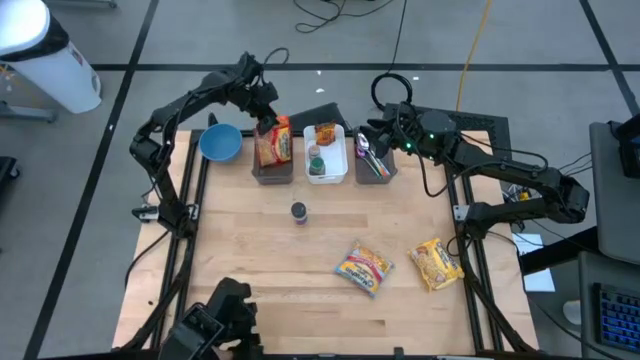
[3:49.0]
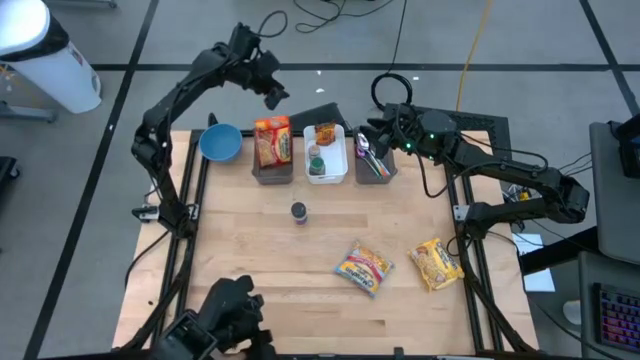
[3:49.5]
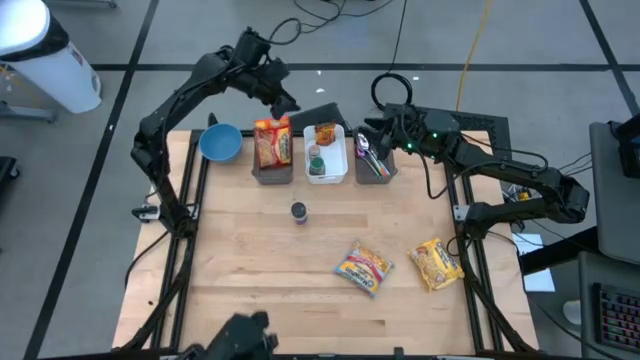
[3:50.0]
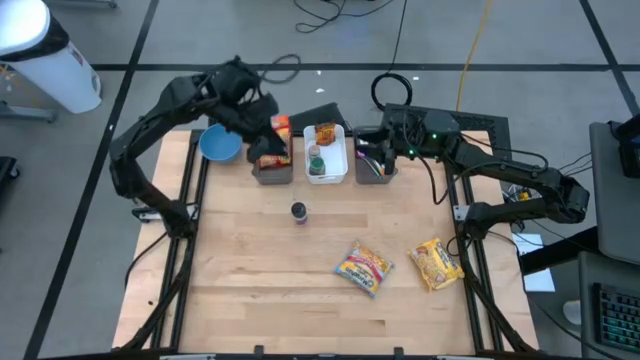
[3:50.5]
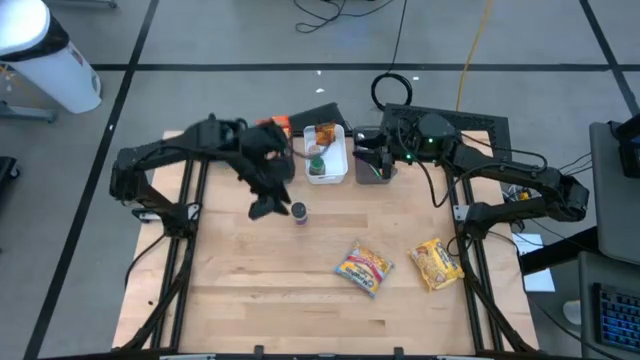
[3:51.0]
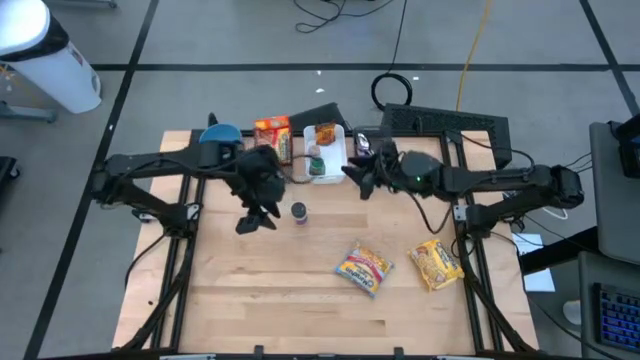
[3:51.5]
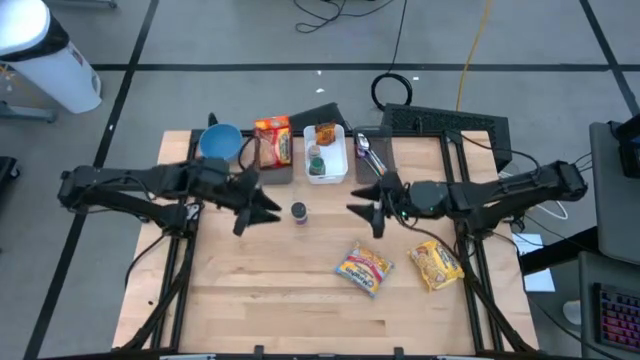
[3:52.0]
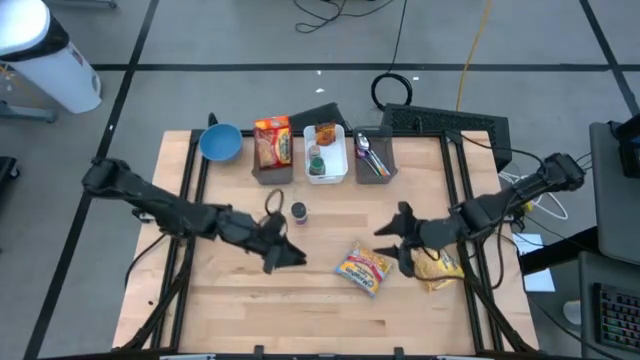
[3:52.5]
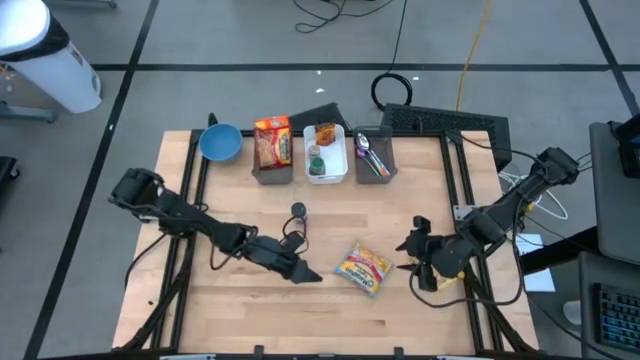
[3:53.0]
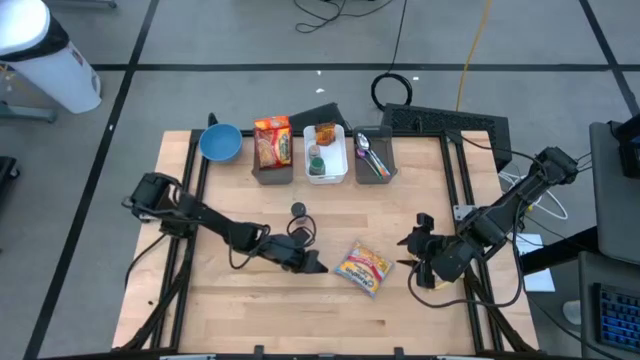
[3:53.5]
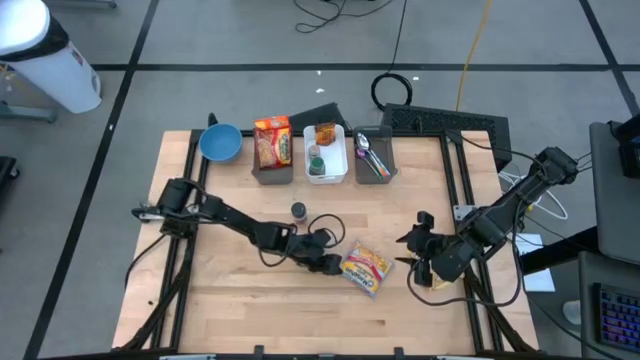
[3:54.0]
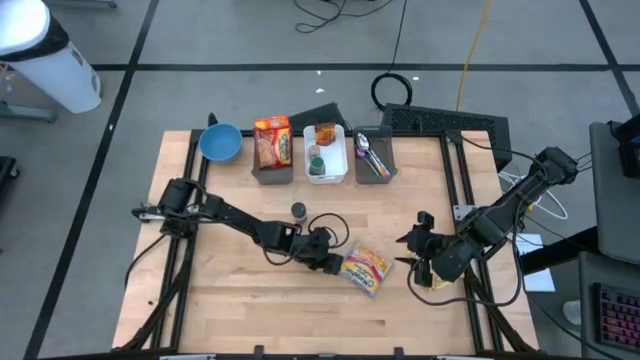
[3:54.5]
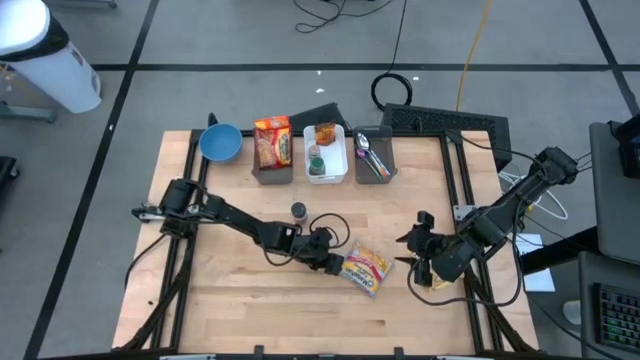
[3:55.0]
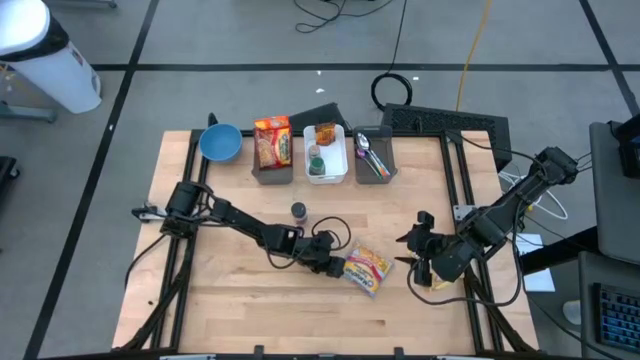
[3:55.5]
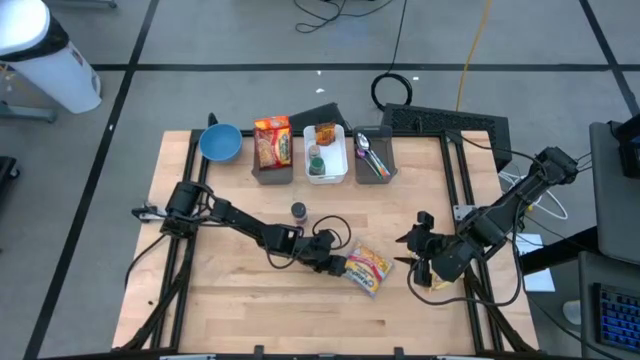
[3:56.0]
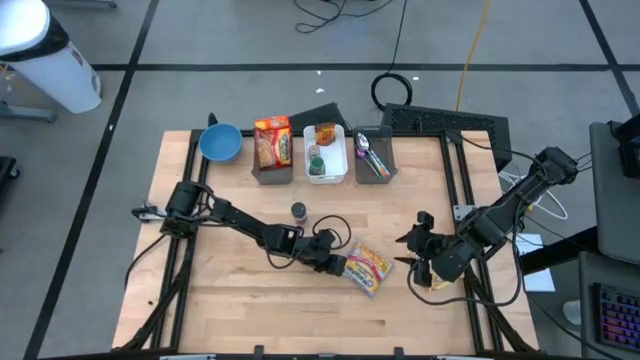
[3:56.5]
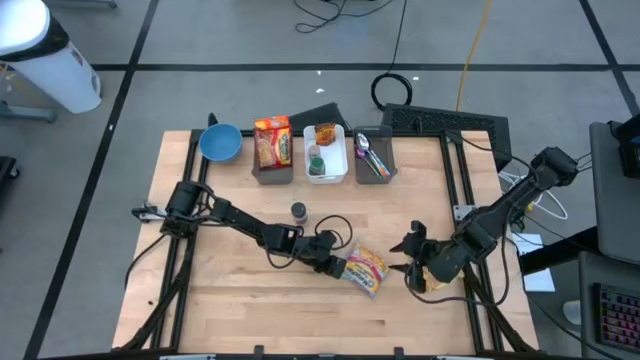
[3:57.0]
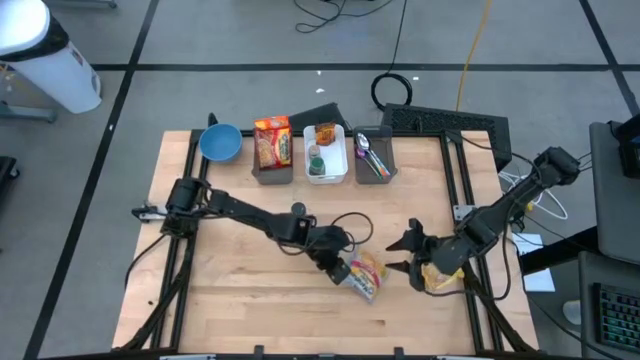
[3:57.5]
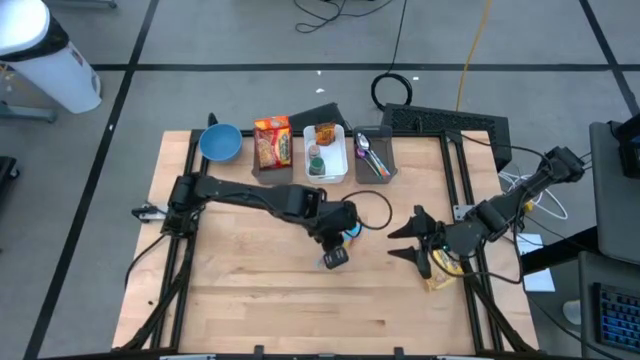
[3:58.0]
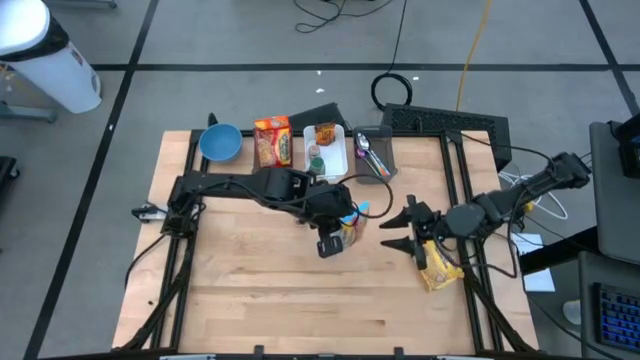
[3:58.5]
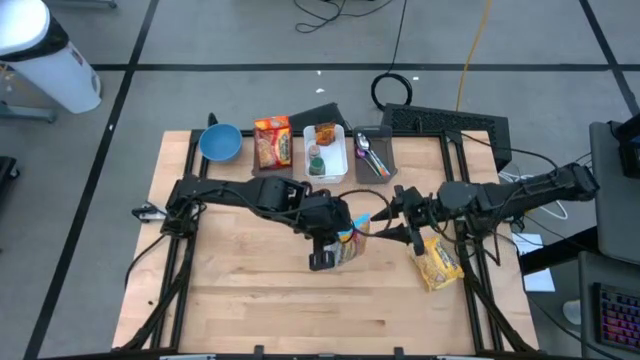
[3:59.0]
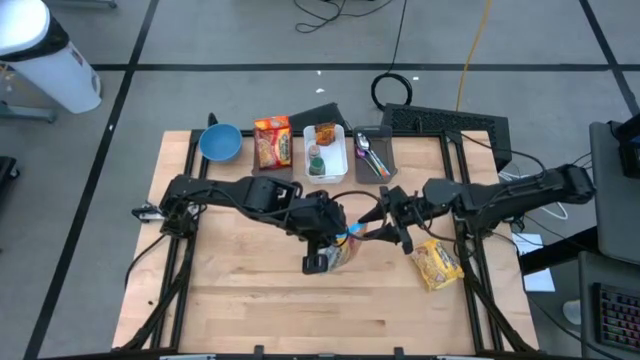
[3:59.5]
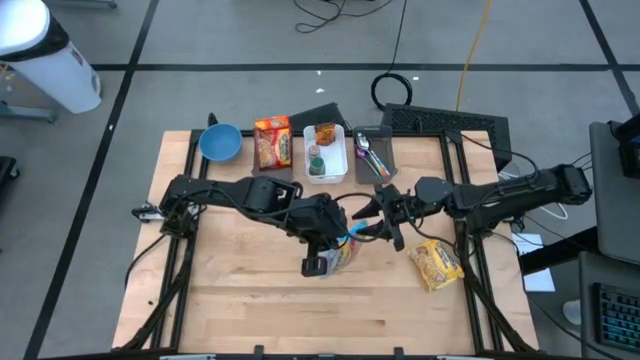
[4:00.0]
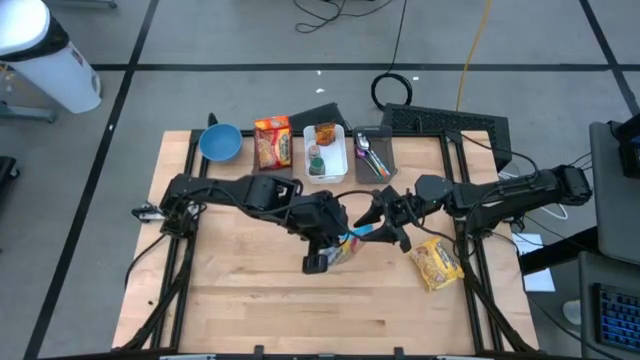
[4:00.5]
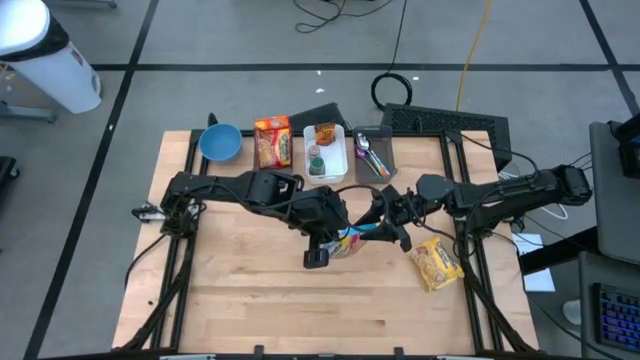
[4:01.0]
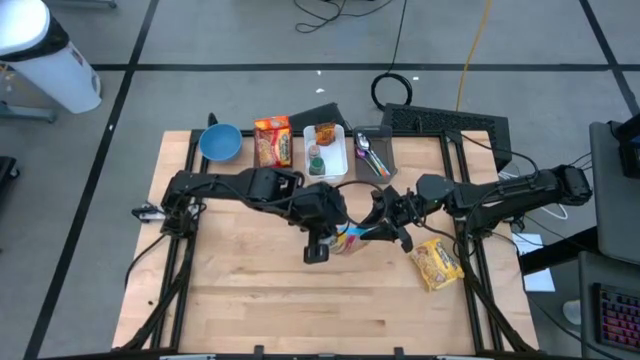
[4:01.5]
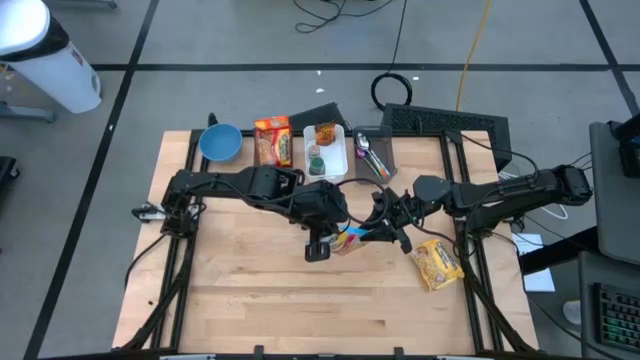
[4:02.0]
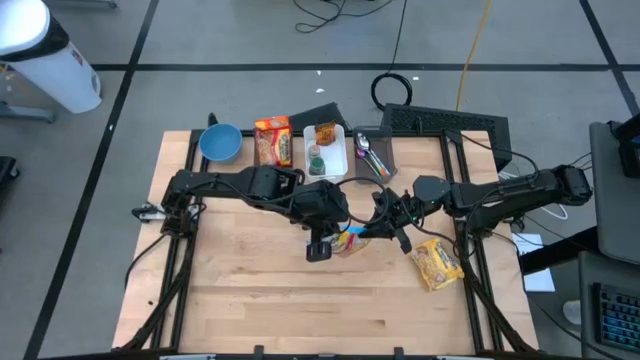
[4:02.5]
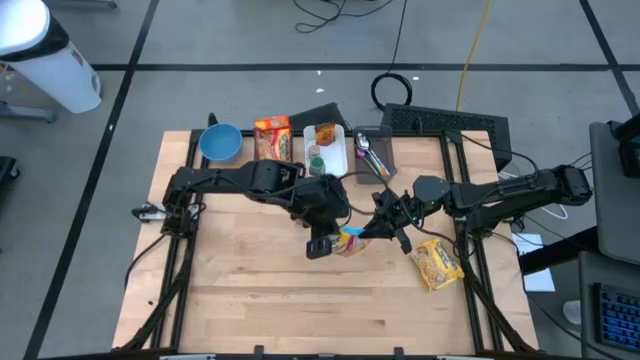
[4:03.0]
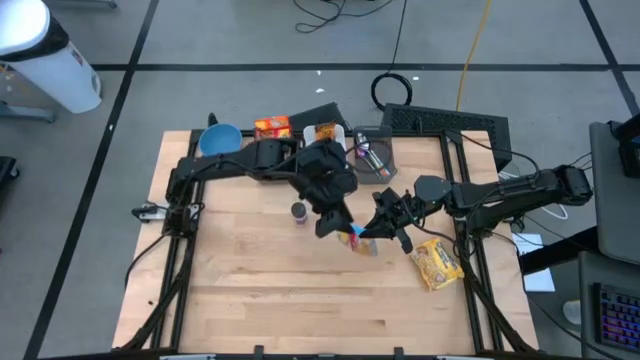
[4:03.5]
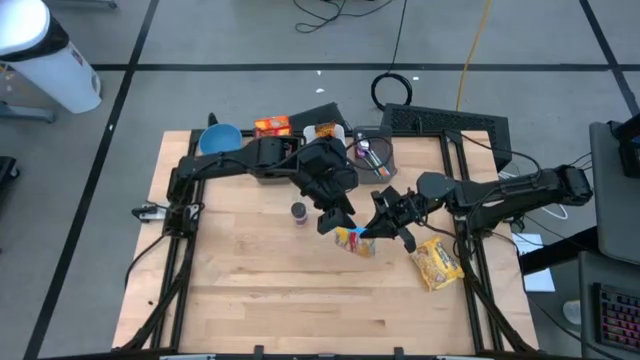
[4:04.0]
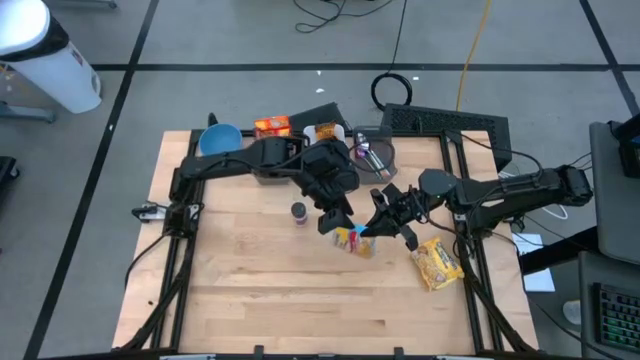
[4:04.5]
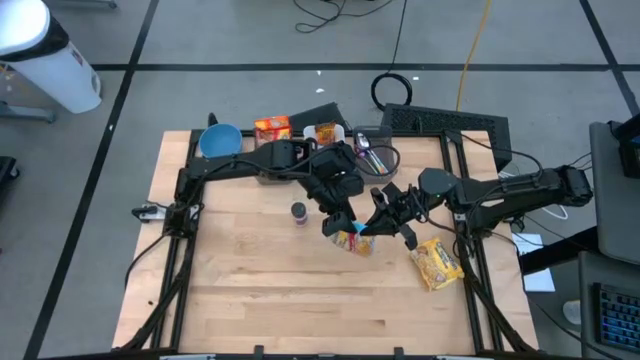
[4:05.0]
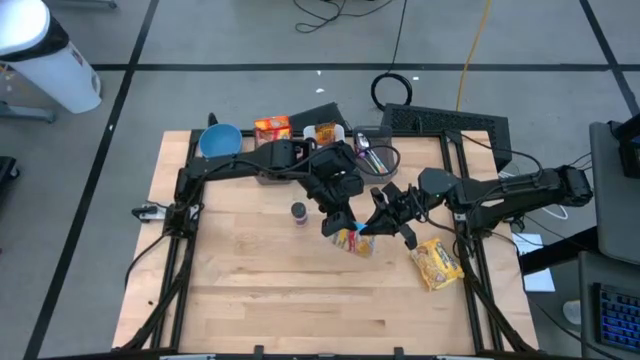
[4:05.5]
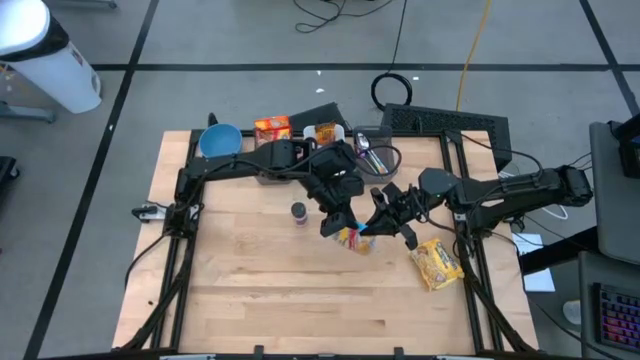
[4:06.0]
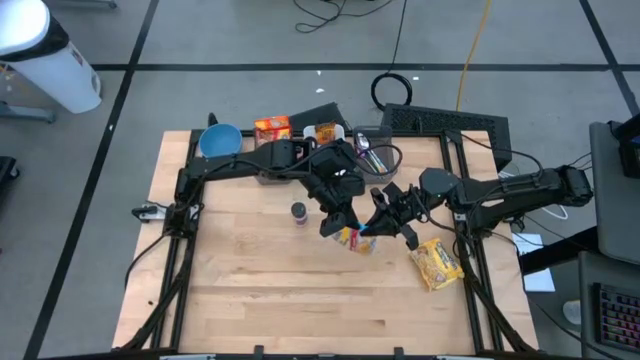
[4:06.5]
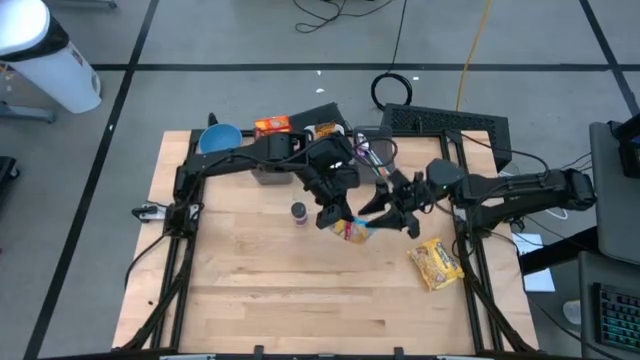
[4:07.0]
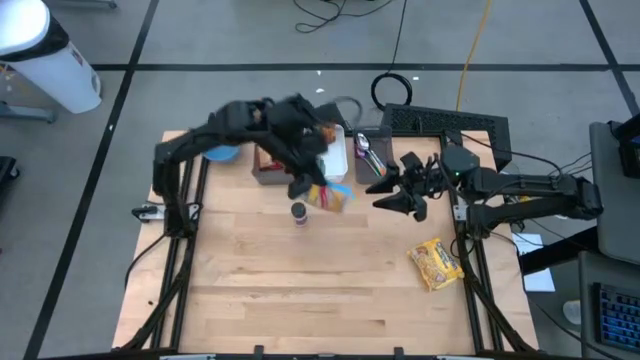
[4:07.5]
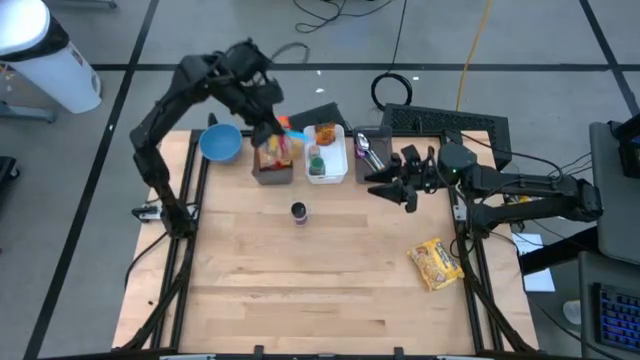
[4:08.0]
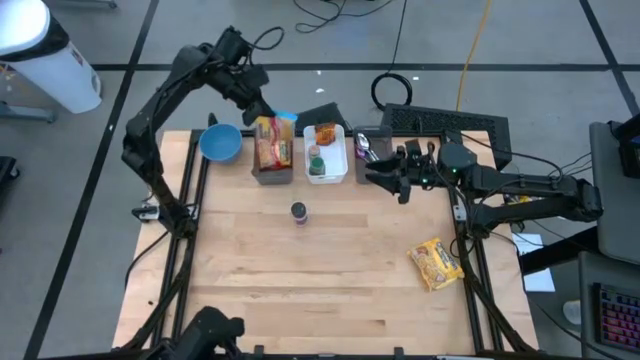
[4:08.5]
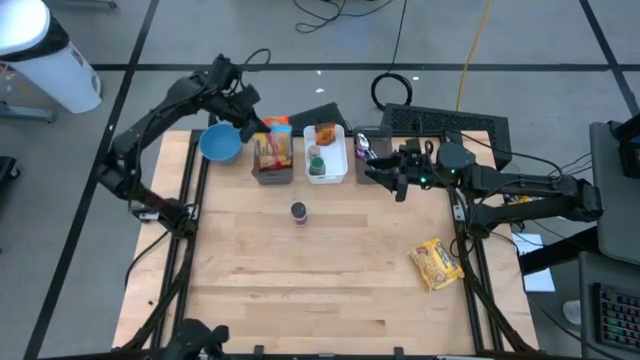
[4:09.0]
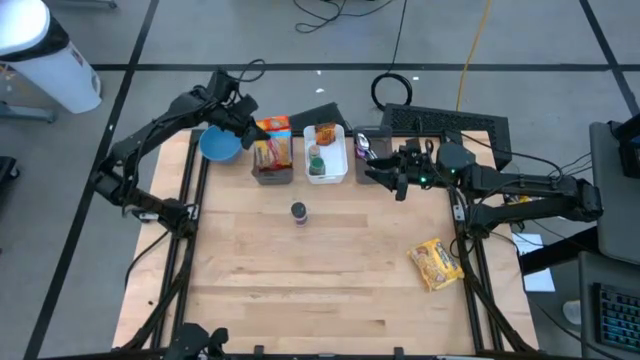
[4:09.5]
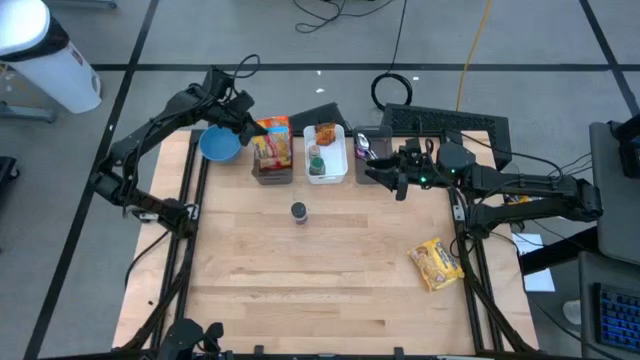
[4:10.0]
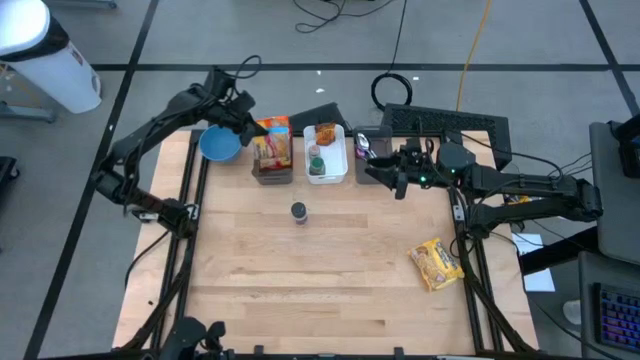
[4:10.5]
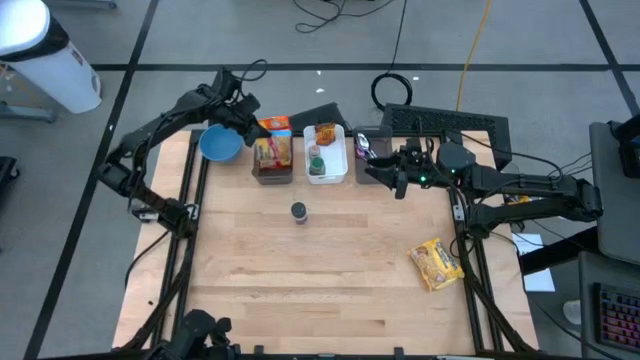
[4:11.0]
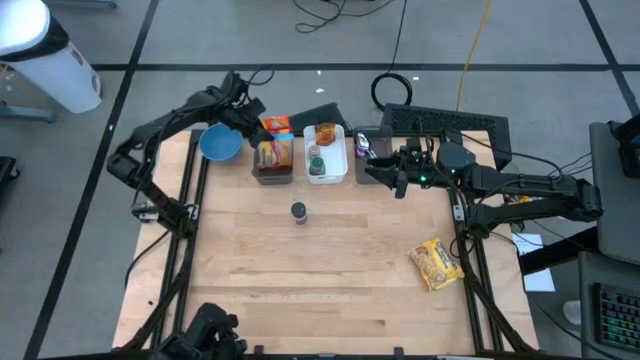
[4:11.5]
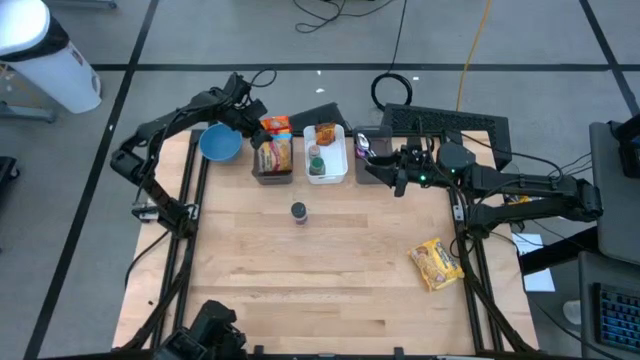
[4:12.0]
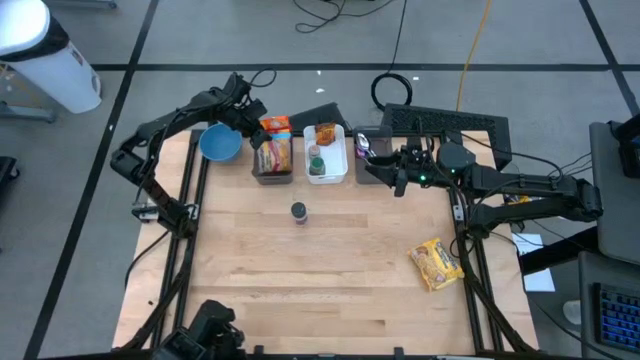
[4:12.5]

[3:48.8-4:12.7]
Task: Pick & Place Food Item
Put the blue noodle pack into the left black bin
